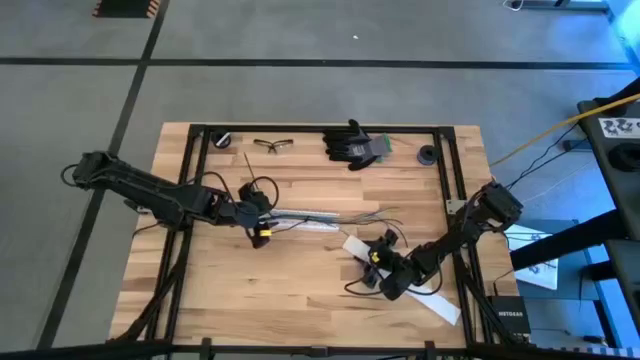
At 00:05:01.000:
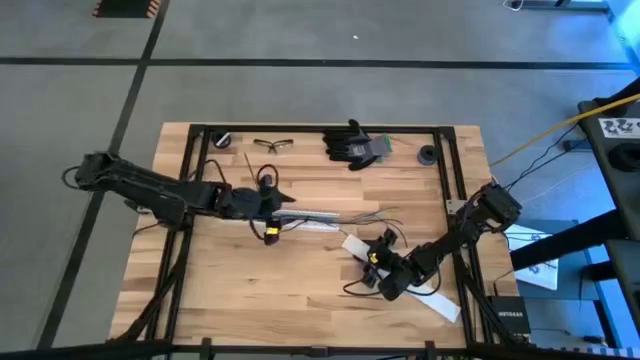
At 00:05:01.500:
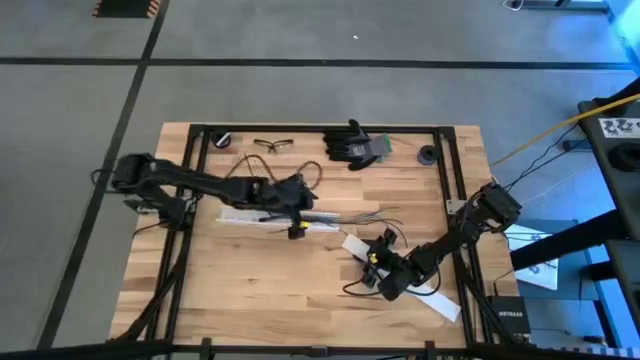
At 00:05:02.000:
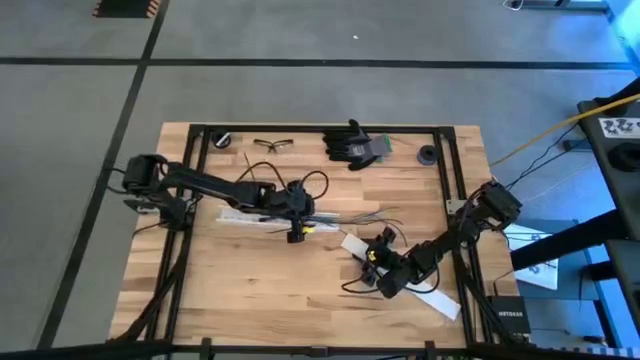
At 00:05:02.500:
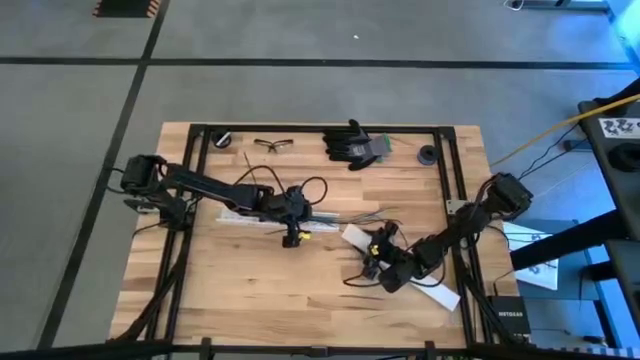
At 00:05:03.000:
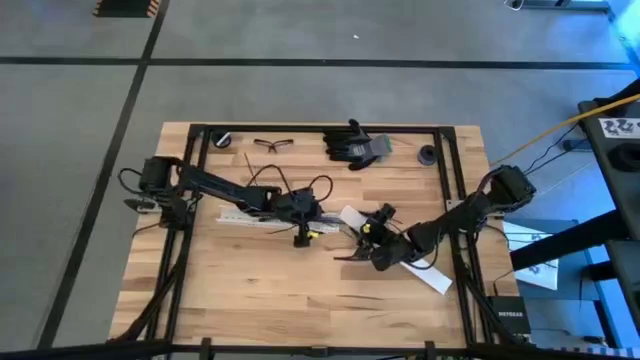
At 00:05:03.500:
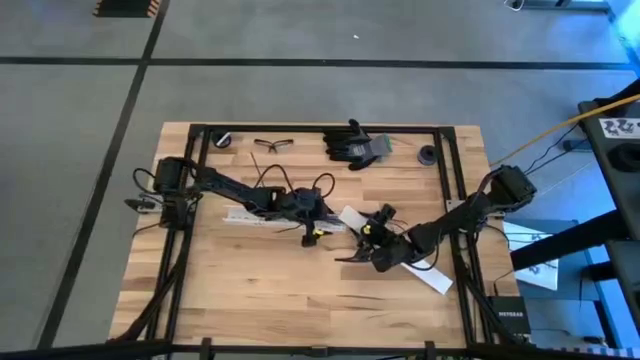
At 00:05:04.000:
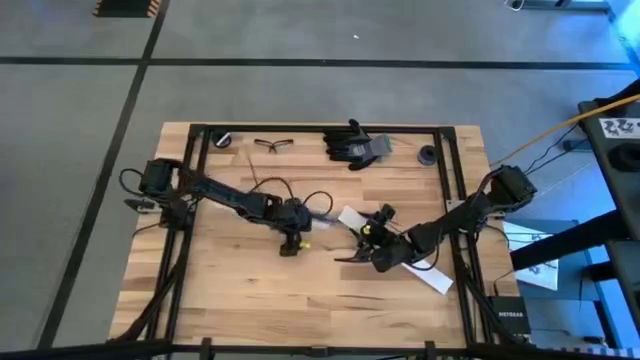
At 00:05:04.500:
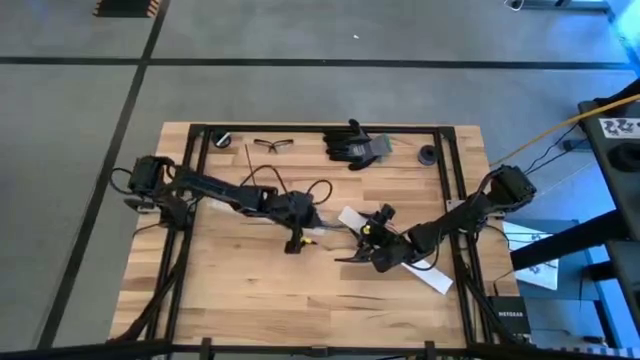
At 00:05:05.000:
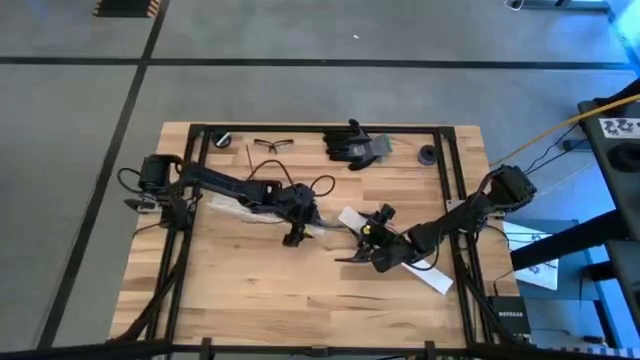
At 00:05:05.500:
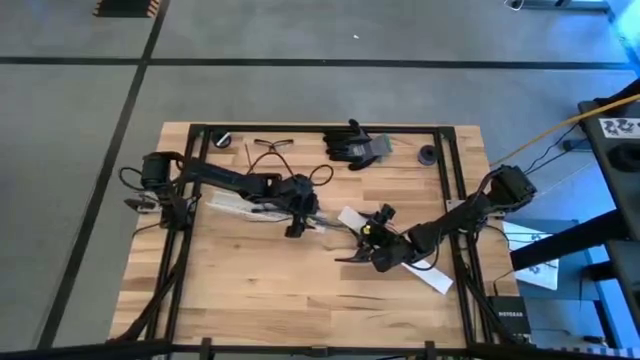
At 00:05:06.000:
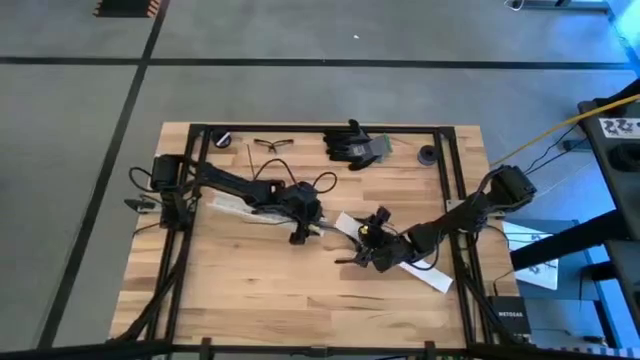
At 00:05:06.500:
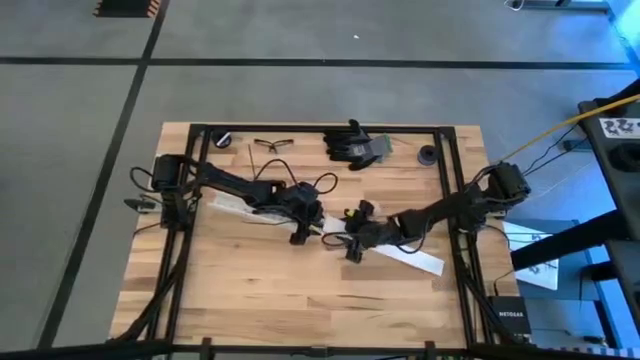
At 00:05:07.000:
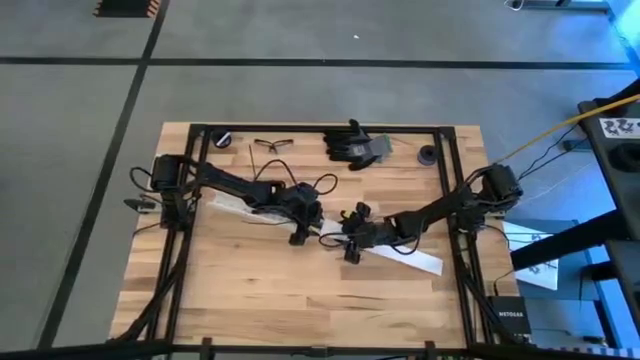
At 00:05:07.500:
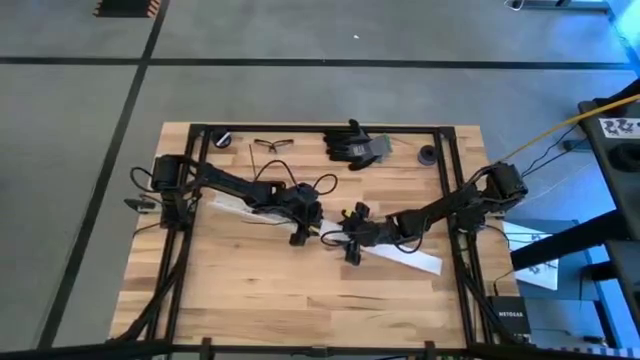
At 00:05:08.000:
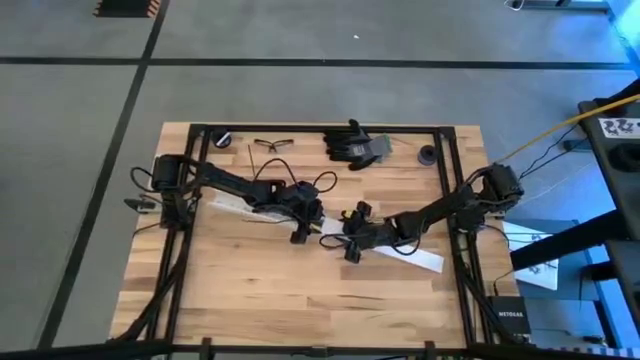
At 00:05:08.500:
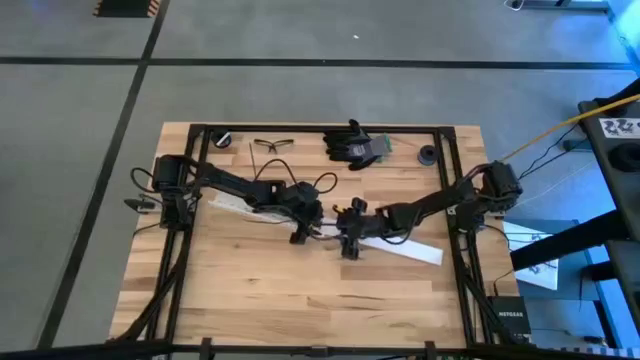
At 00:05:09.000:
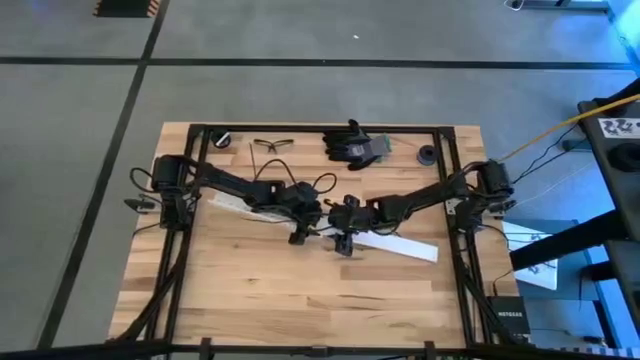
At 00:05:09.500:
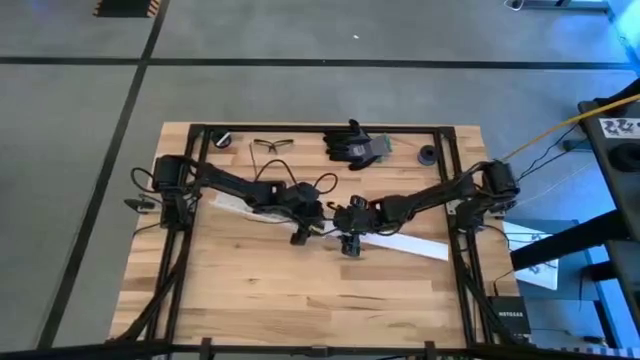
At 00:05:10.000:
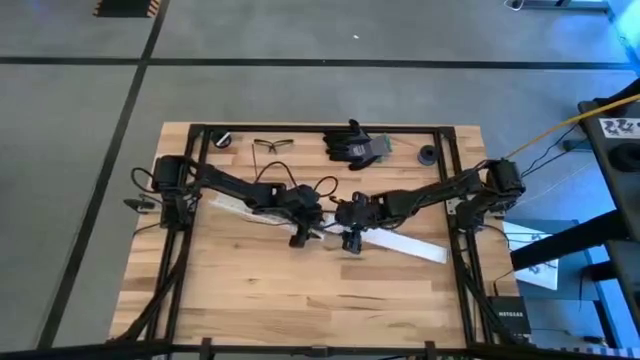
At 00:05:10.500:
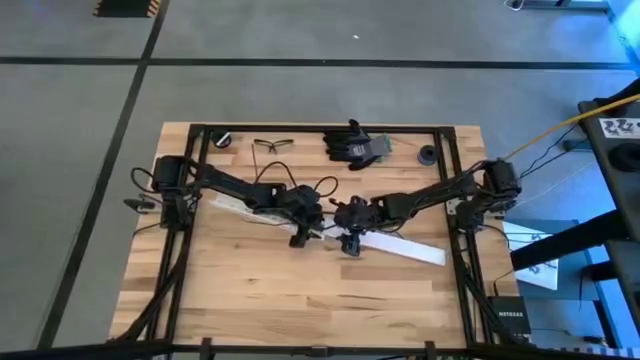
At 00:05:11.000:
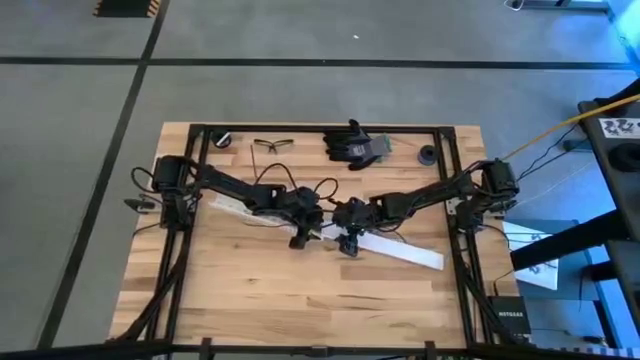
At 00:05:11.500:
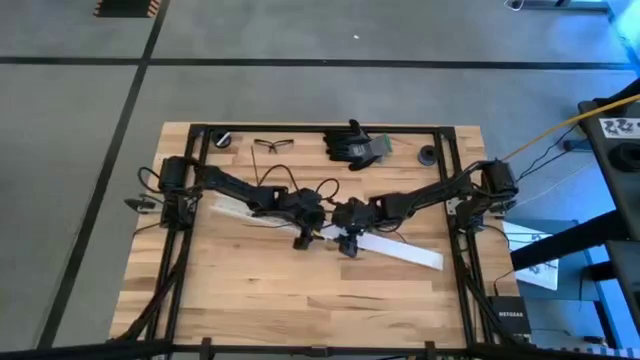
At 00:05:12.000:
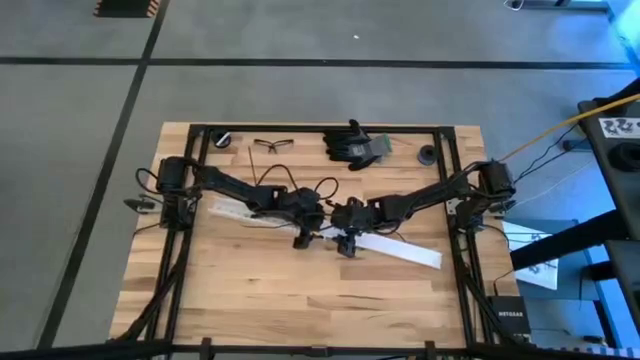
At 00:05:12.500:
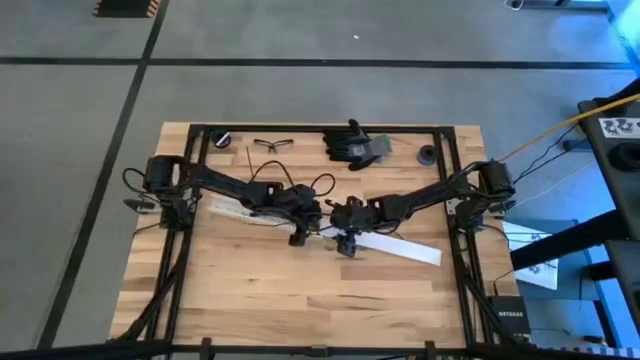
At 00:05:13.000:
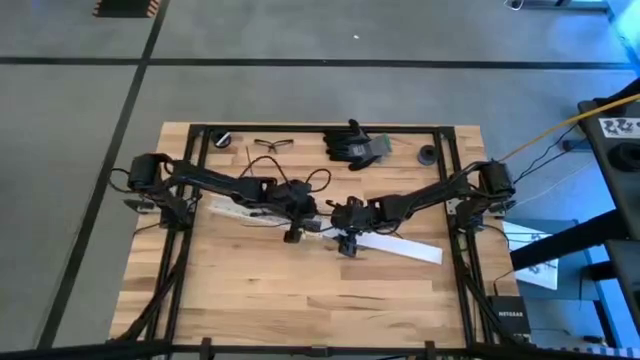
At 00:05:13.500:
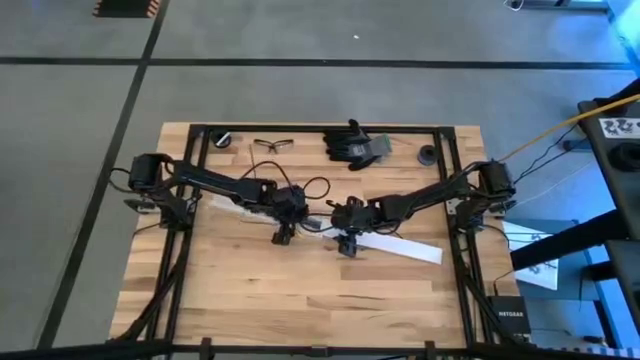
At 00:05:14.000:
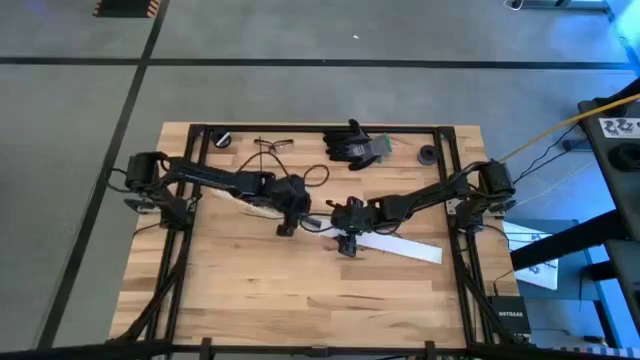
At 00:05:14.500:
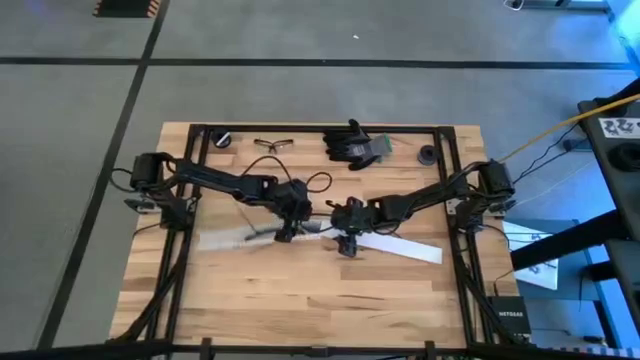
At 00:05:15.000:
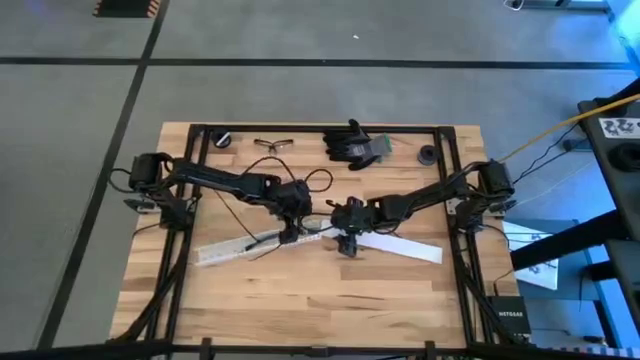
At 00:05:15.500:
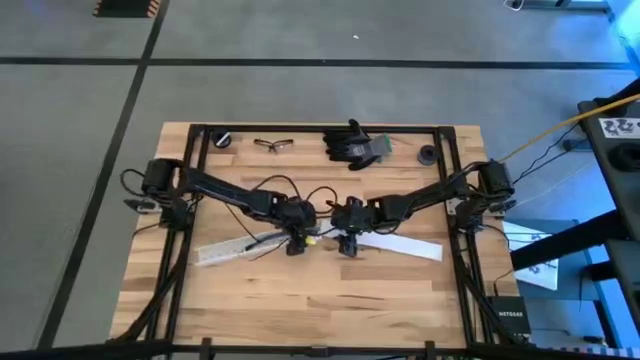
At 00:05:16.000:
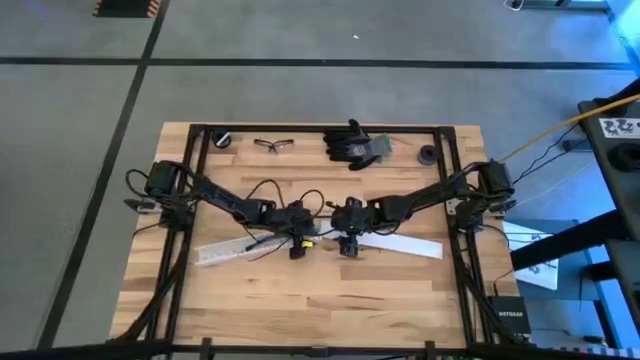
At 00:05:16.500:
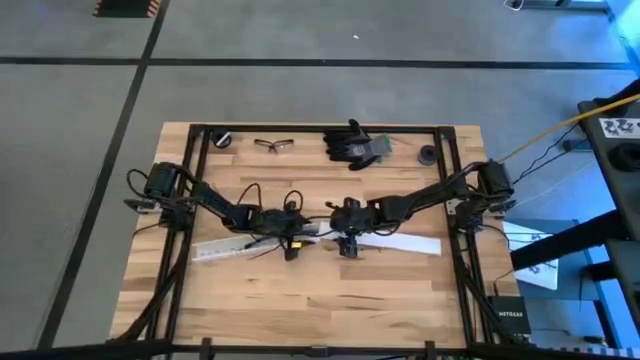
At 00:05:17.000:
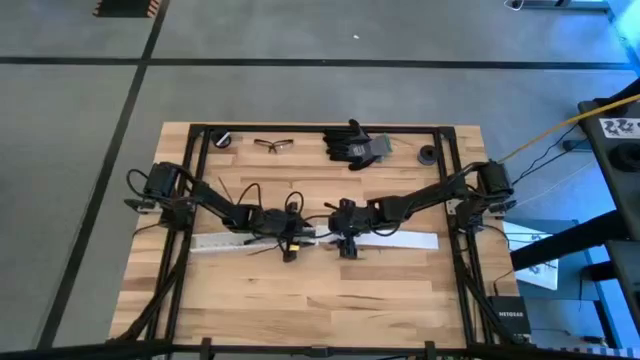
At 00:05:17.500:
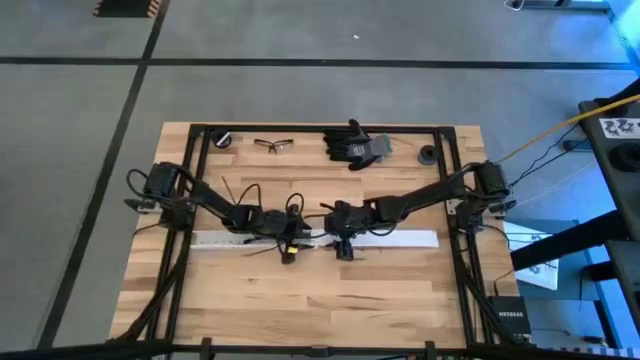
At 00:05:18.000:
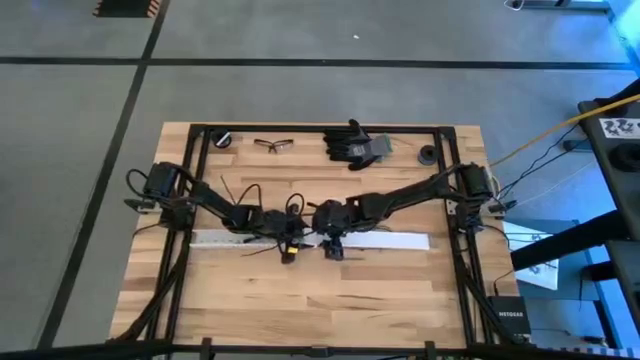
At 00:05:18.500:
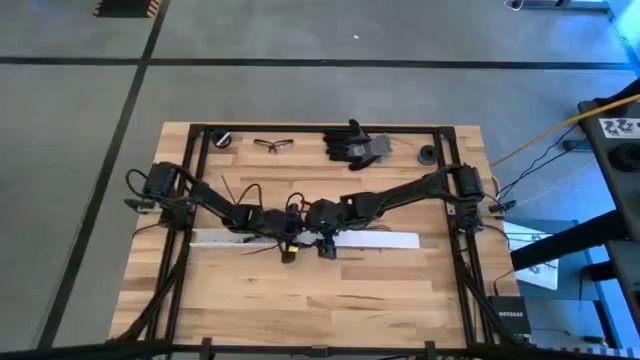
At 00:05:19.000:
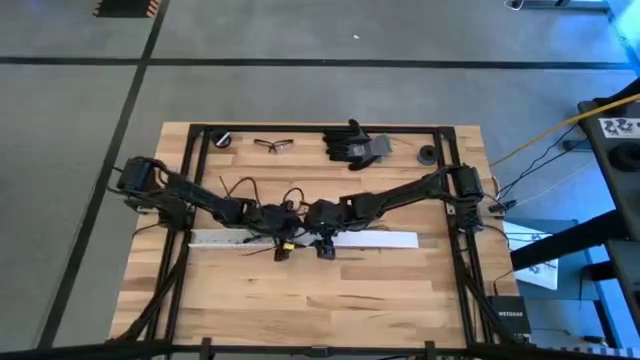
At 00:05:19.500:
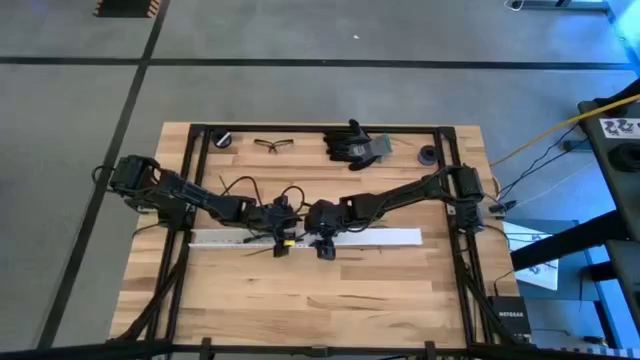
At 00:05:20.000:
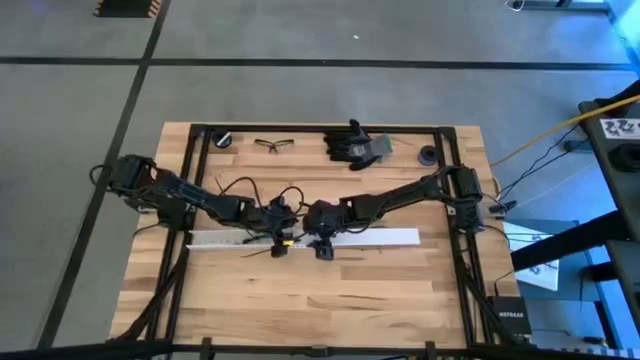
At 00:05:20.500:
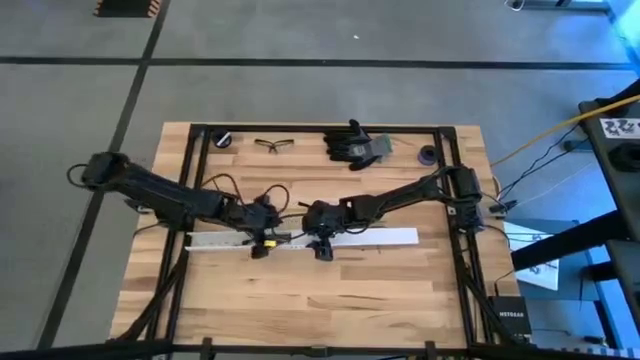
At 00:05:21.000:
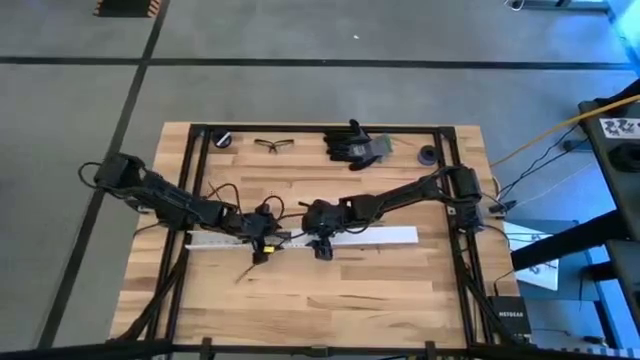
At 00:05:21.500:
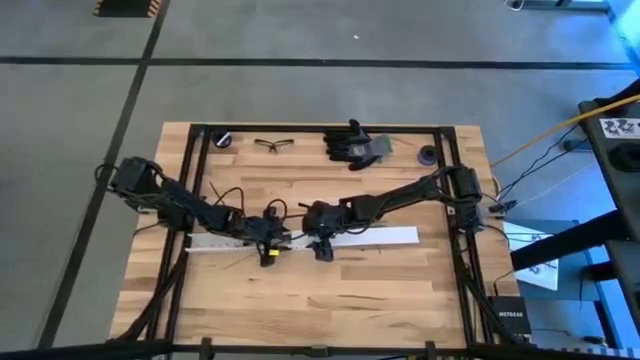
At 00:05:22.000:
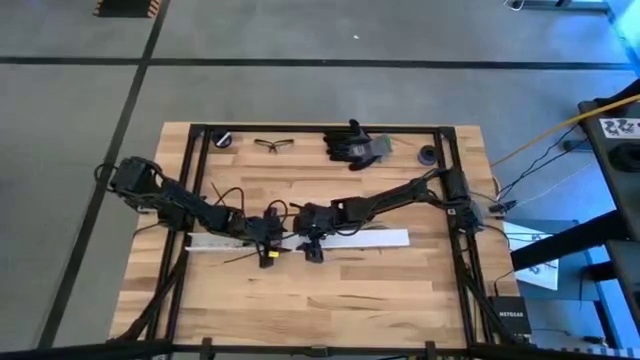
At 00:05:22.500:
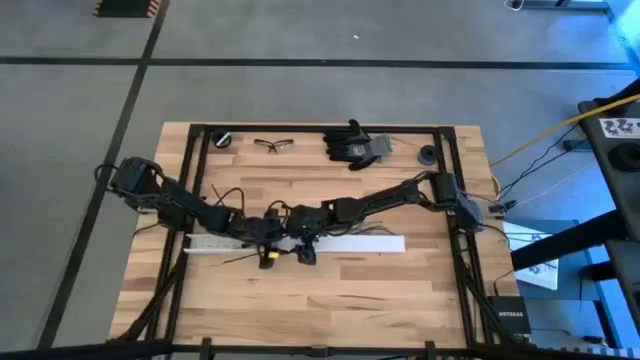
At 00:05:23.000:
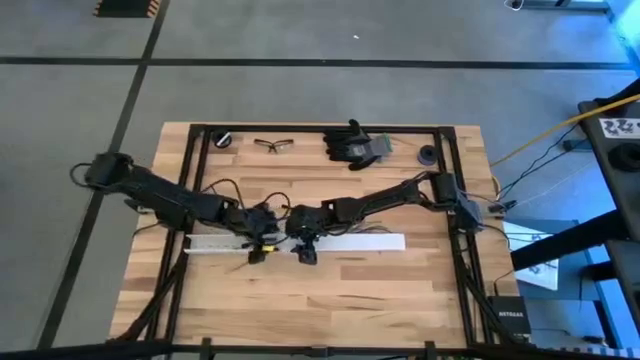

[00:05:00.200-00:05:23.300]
Task: Ziptie cables
Close the white cable duct
